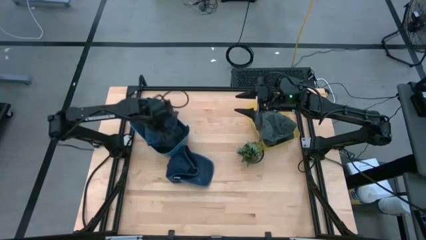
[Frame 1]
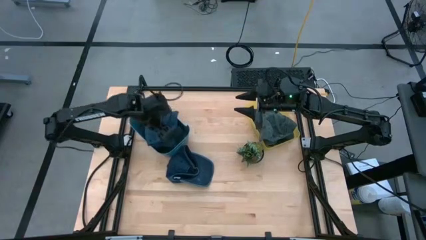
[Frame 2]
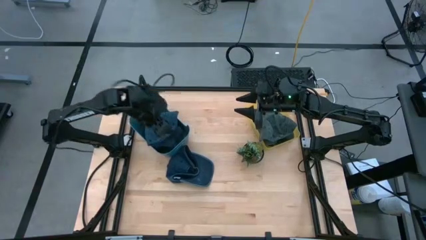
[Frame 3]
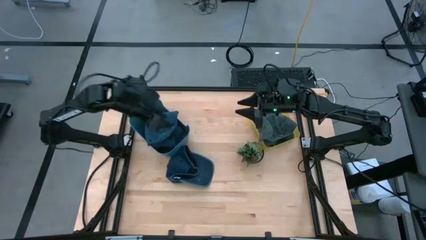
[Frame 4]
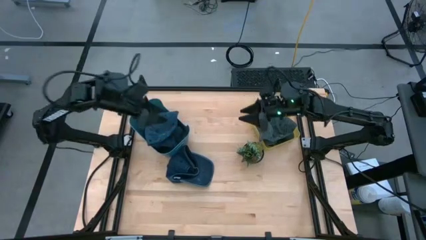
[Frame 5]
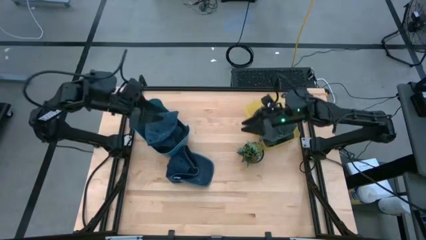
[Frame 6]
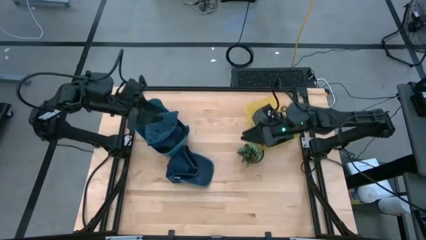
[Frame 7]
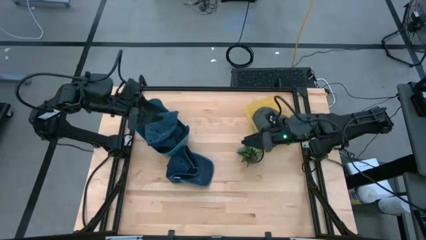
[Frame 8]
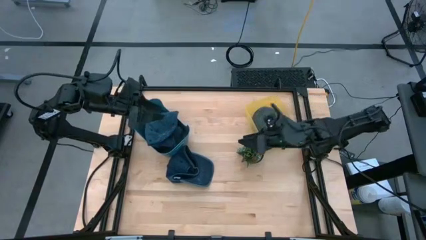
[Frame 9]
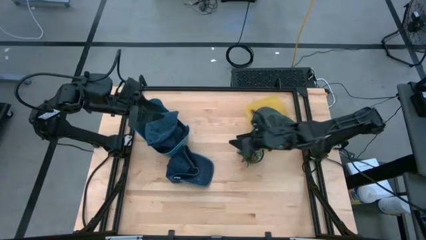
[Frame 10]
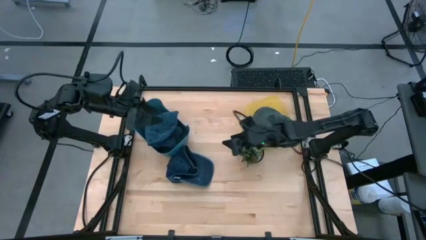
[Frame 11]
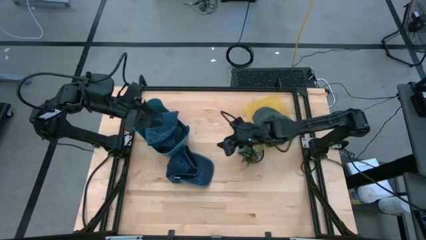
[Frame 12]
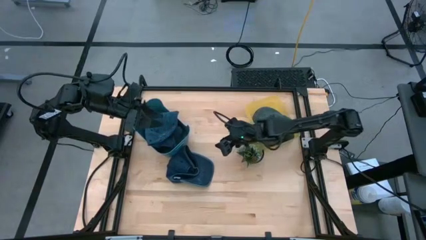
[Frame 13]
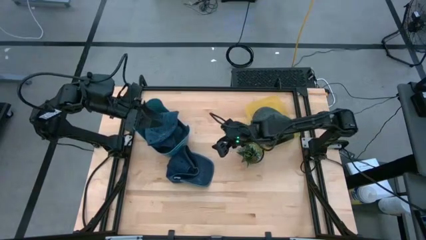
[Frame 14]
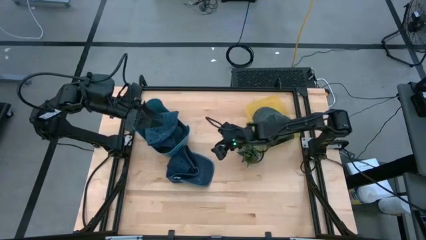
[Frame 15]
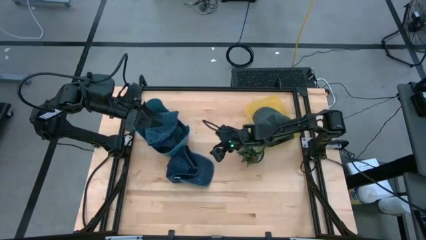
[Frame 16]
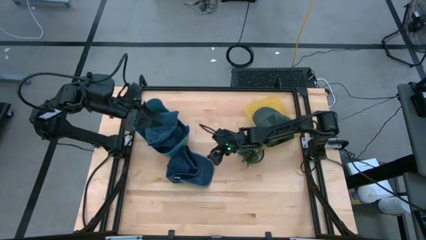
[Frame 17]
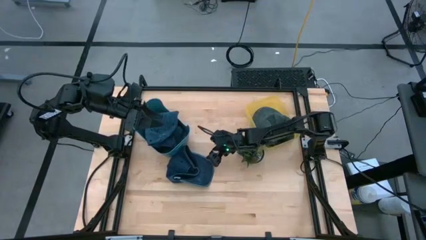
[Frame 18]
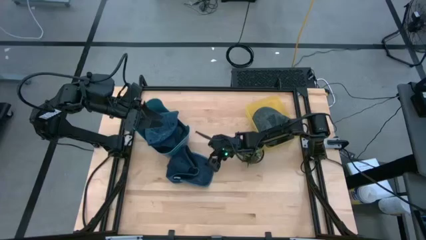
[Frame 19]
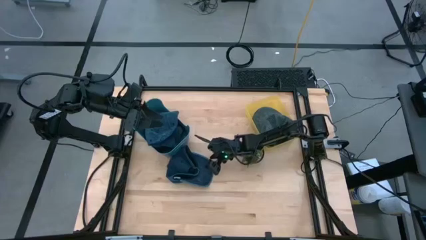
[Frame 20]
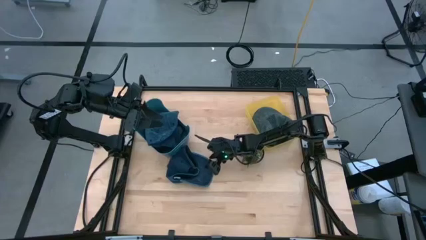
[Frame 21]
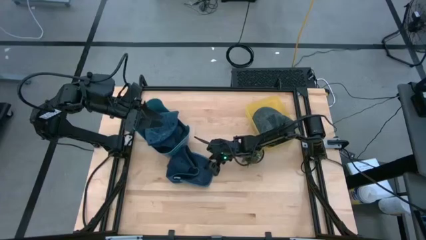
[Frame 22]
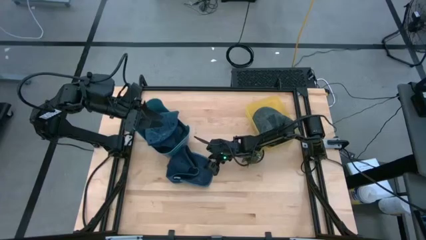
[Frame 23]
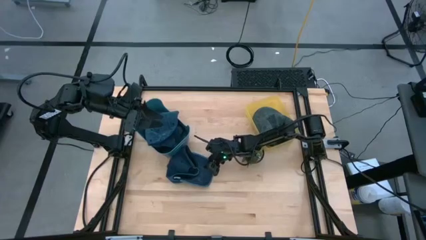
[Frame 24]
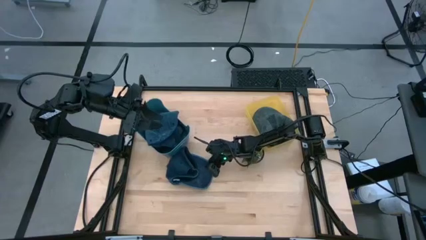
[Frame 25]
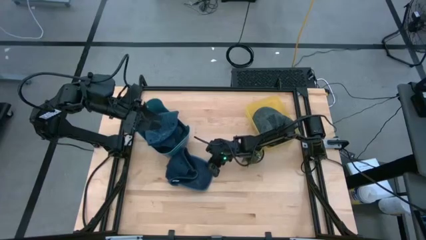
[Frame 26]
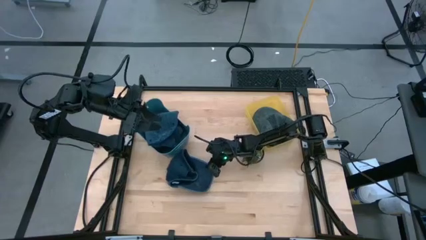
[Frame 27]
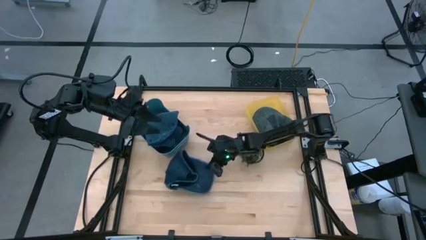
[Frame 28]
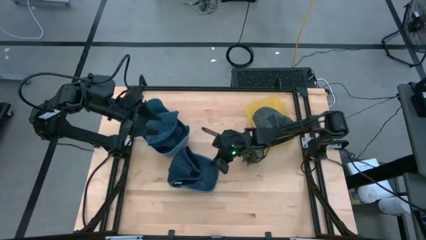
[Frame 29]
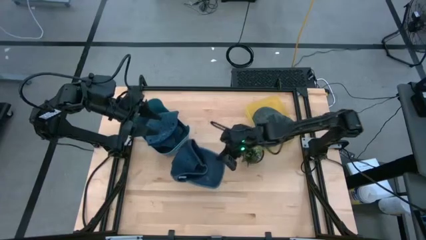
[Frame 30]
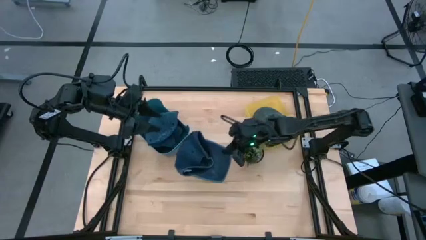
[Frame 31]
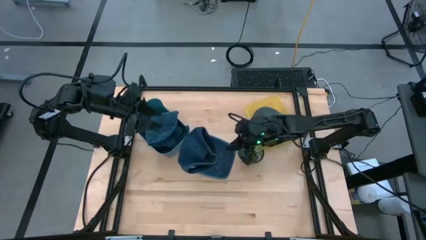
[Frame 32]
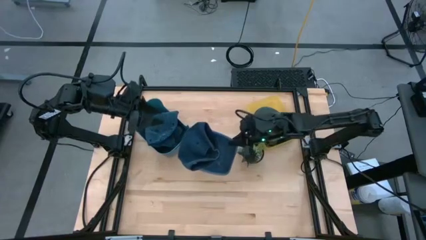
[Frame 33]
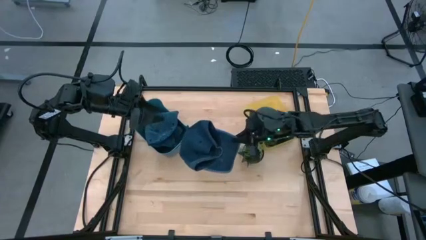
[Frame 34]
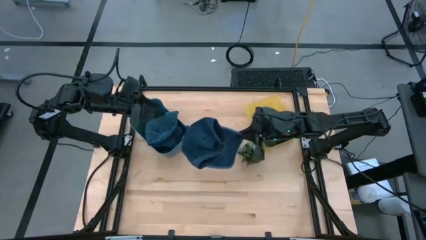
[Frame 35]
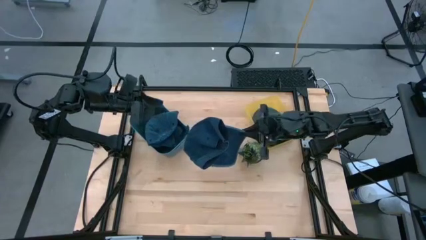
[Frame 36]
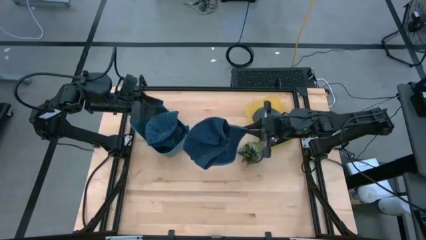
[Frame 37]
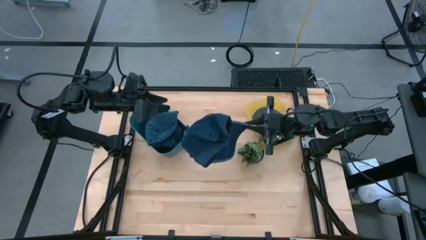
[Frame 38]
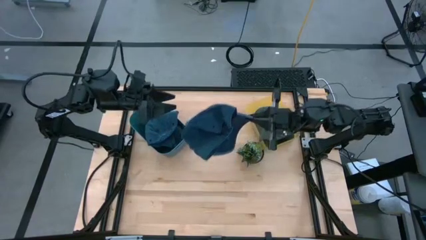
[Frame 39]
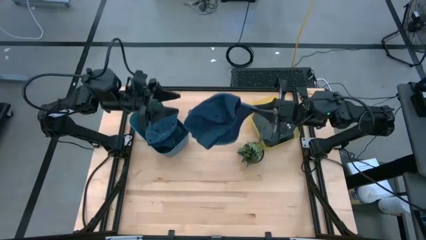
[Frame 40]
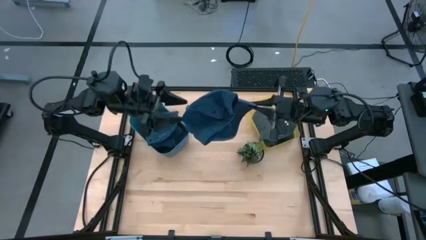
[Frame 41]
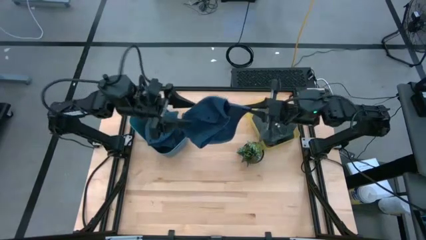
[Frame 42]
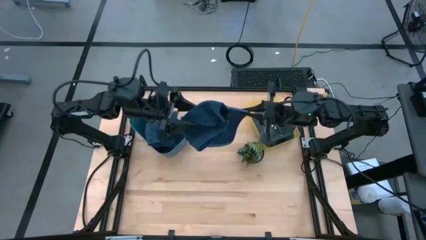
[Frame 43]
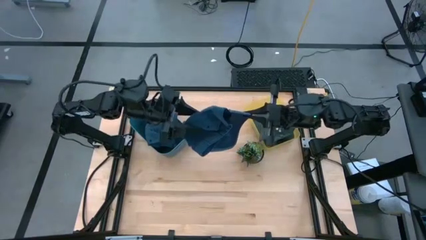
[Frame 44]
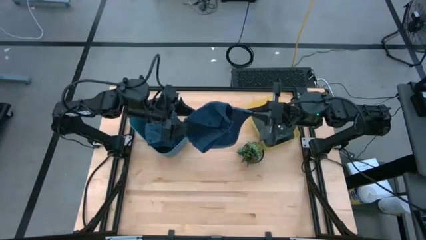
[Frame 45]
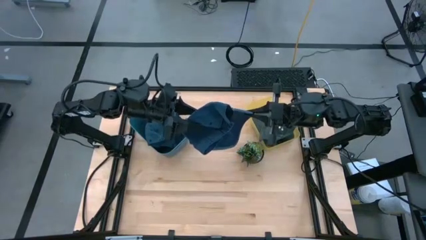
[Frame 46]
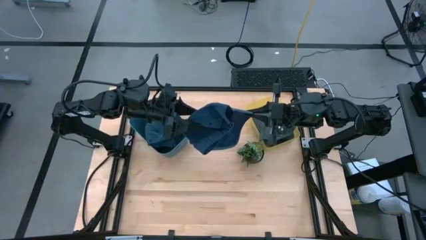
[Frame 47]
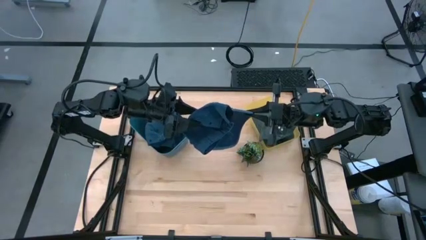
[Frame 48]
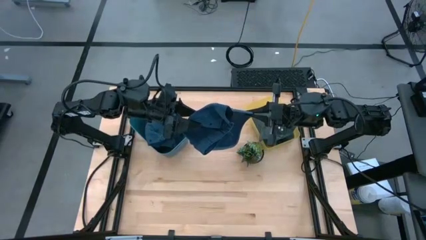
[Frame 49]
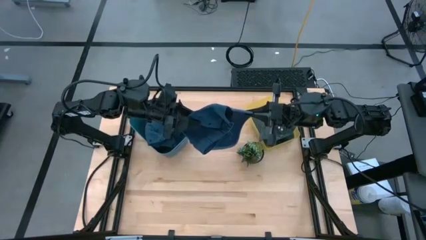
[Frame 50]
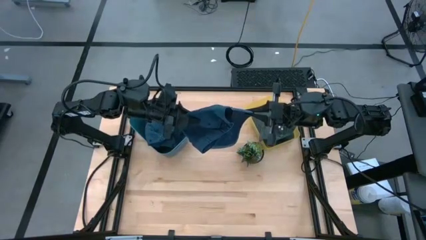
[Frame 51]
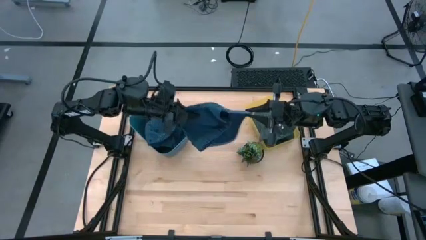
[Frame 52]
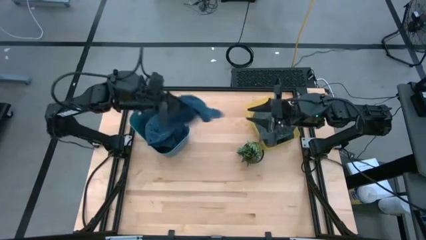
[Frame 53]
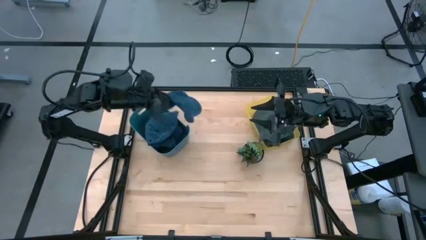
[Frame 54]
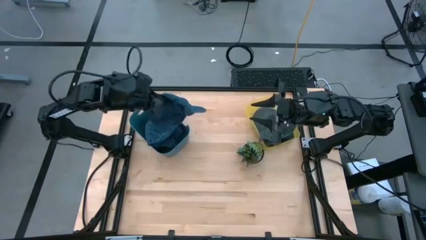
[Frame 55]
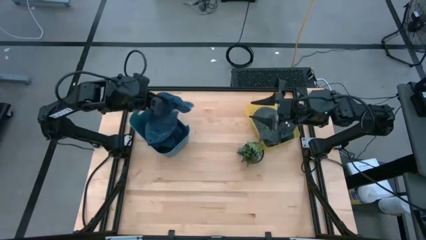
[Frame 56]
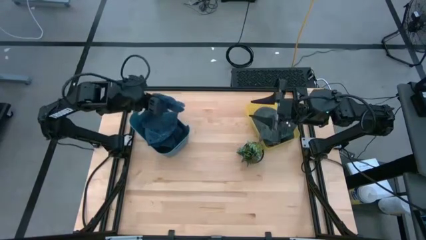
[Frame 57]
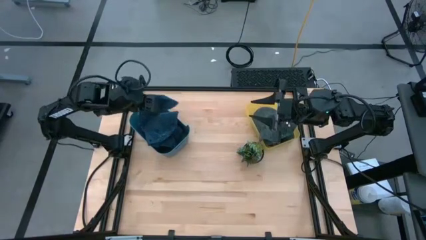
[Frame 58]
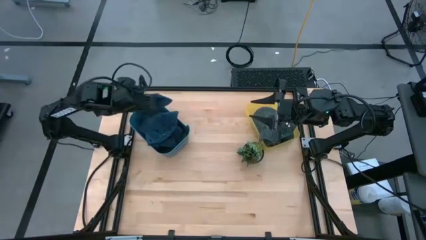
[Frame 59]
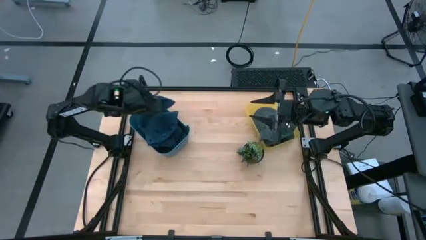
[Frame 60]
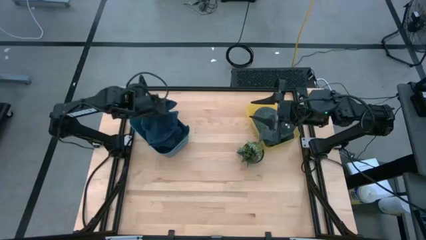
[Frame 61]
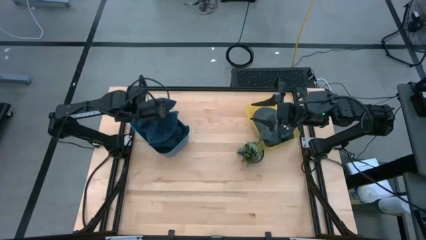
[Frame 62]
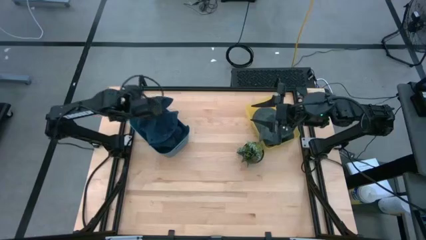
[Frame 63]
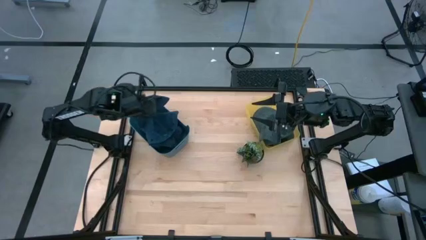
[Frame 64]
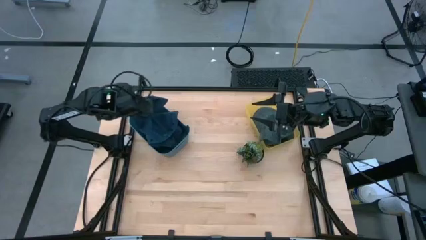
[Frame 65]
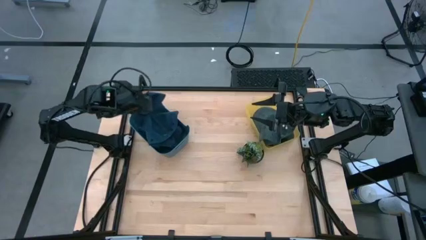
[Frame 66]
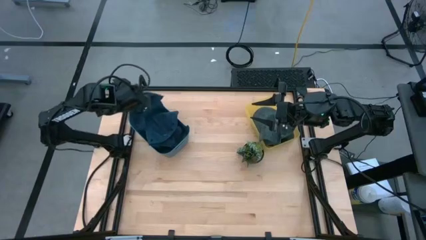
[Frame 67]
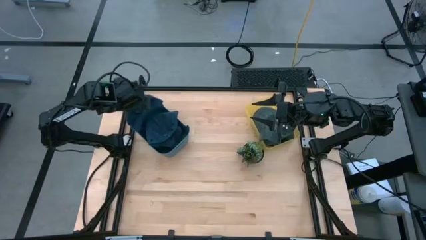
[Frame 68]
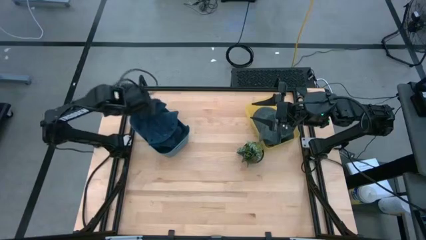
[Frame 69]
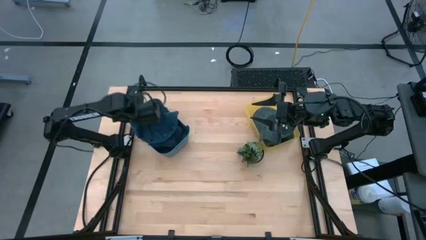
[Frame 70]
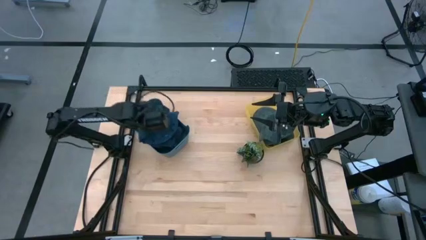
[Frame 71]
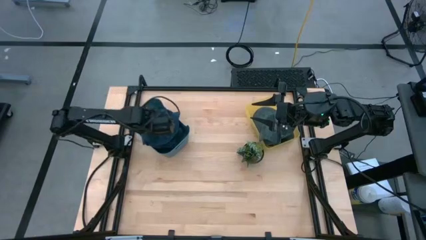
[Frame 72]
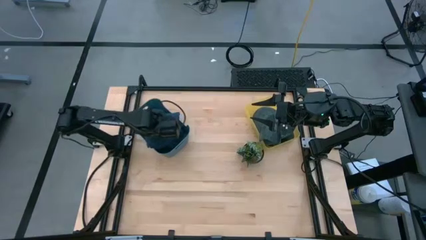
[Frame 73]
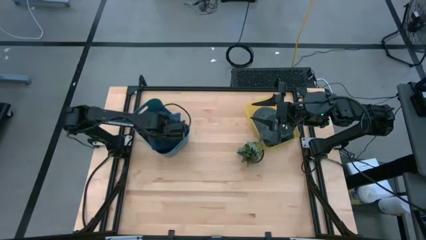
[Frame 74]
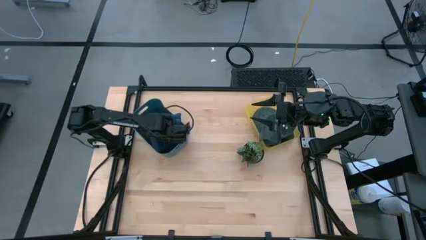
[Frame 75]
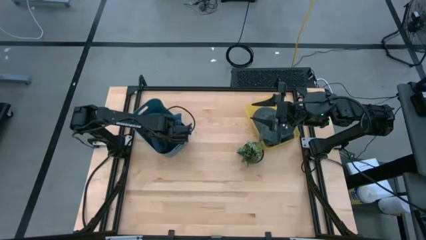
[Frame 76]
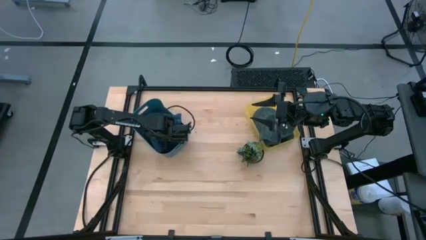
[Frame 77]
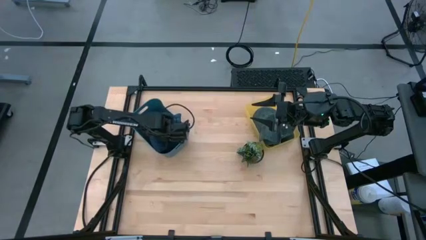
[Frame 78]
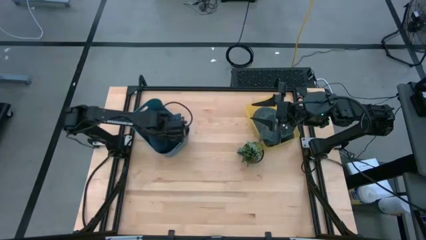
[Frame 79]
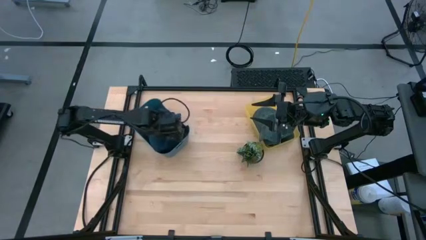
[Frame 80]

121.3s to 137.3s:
Task: Pick & Place hat
Put the blue cap into the blue bin
